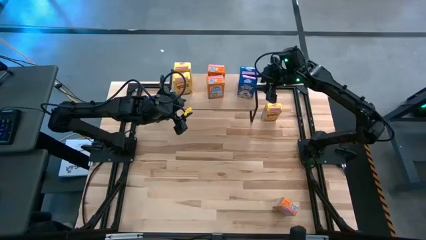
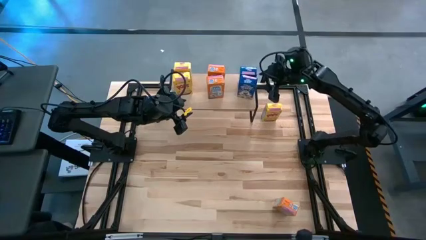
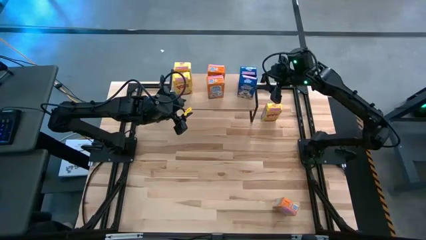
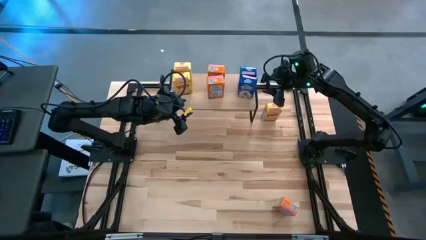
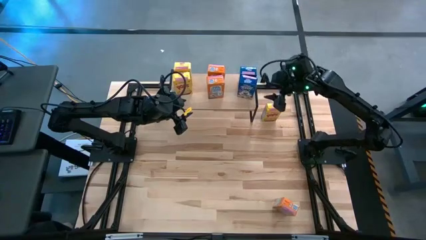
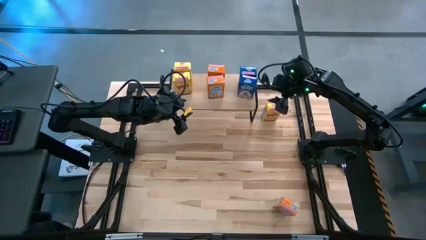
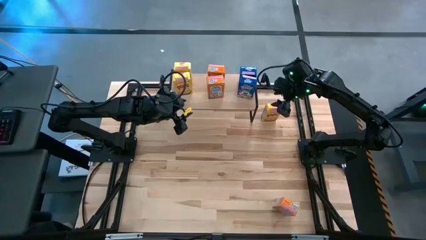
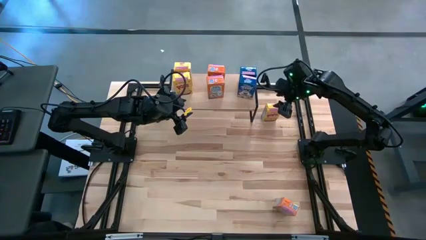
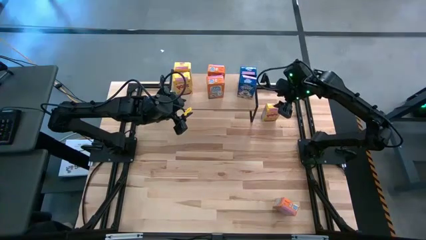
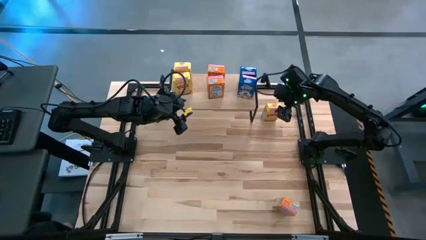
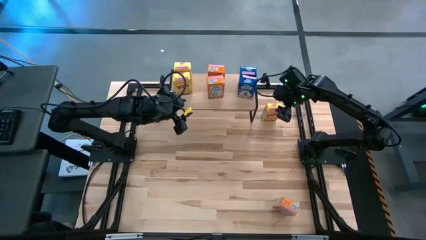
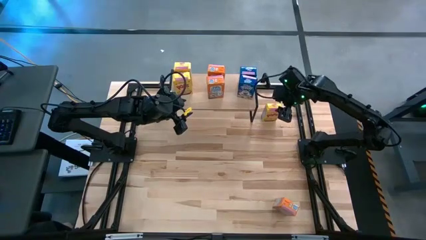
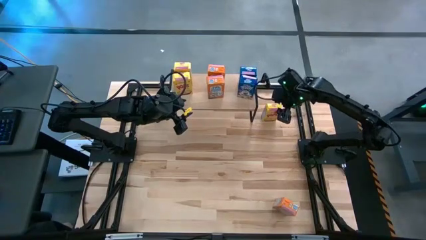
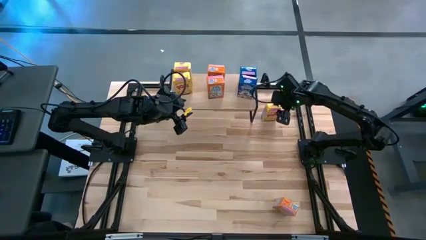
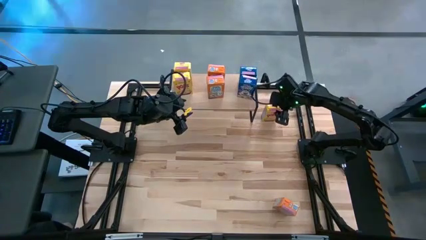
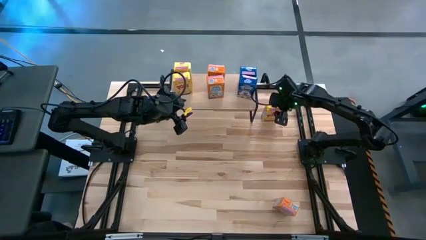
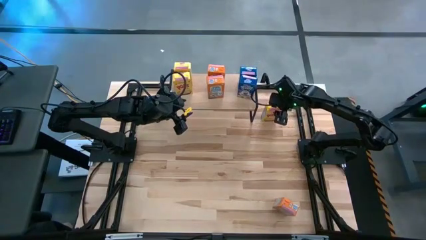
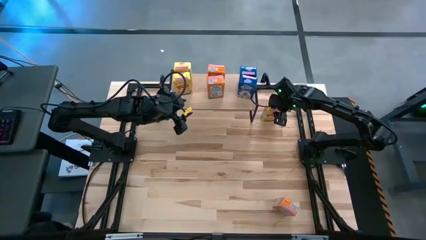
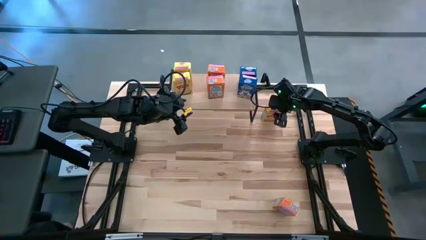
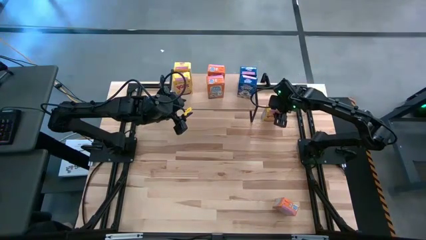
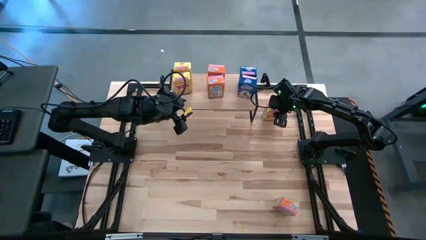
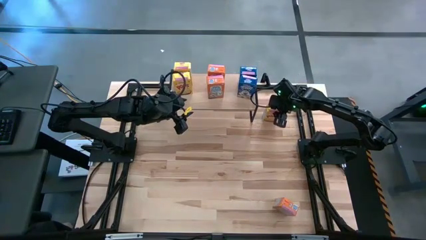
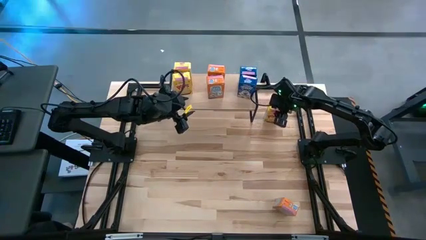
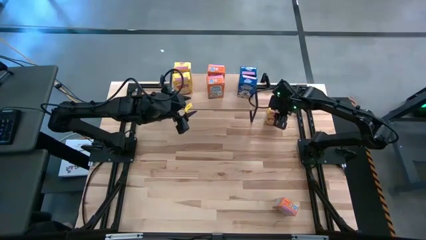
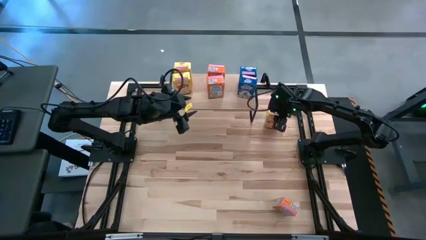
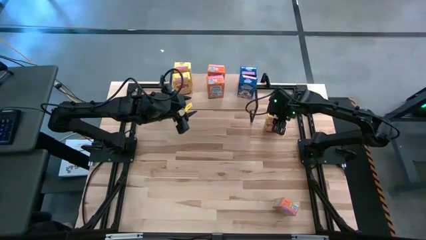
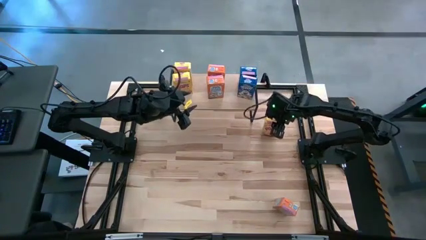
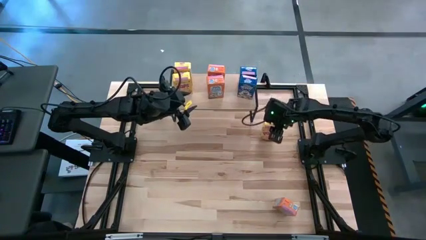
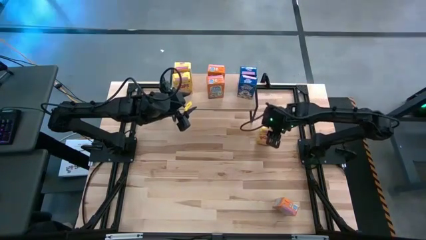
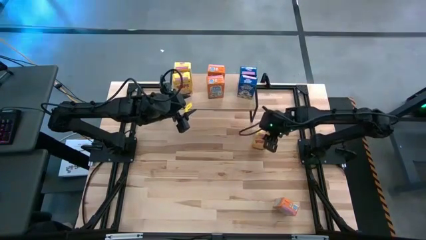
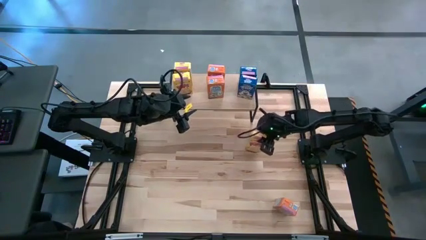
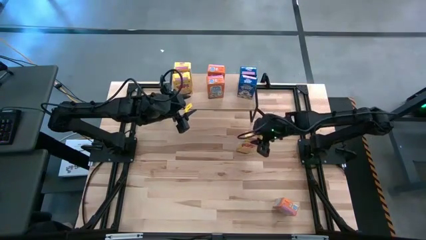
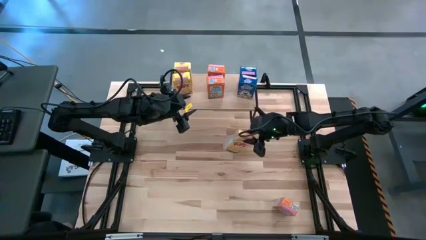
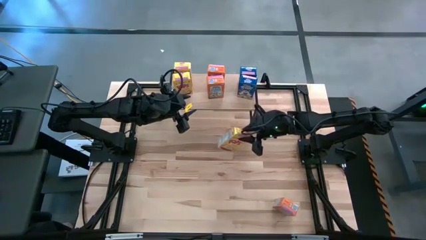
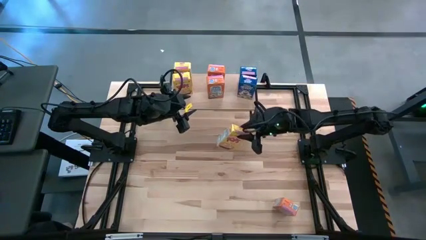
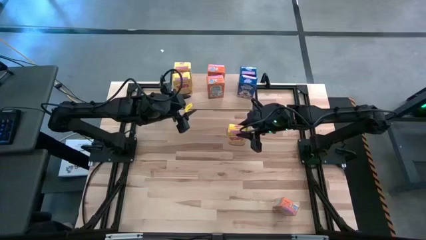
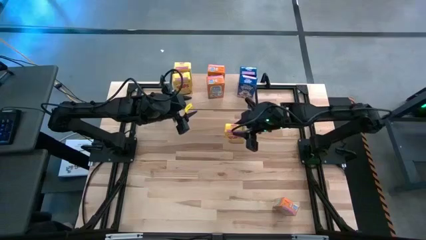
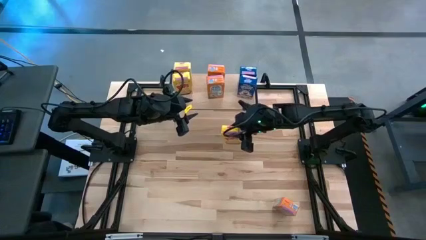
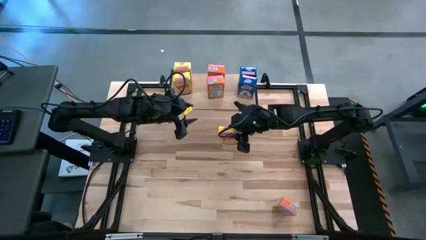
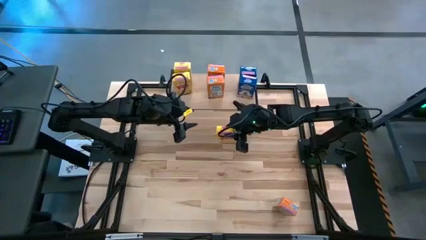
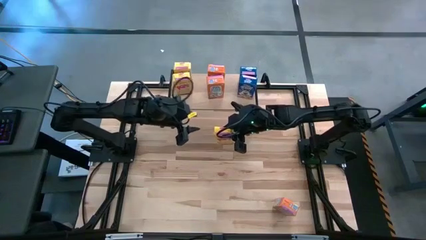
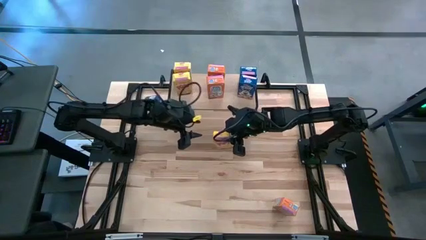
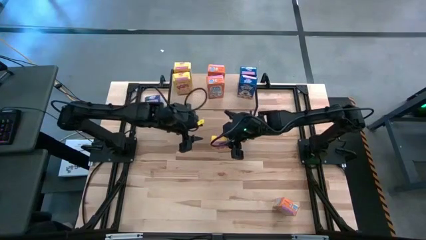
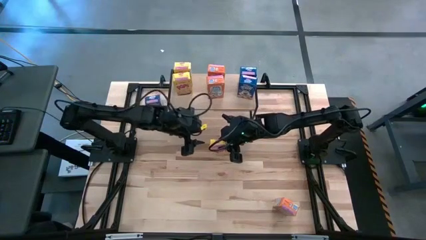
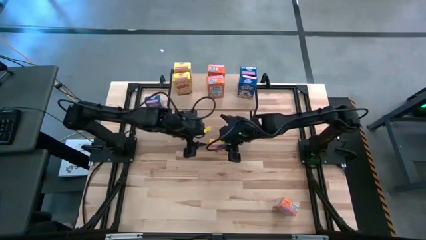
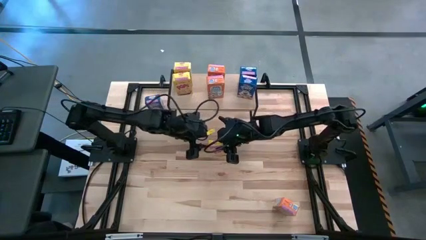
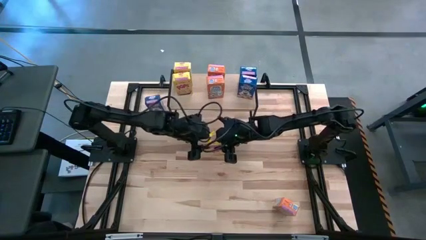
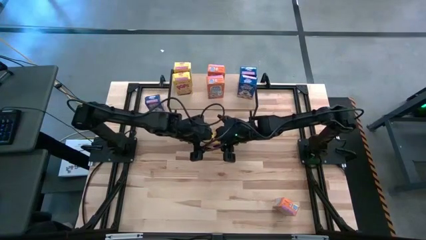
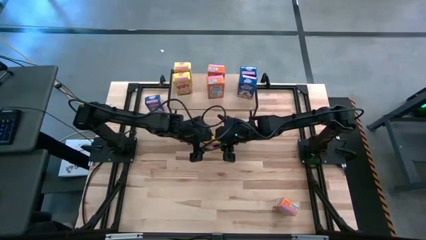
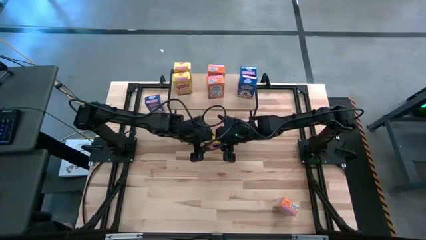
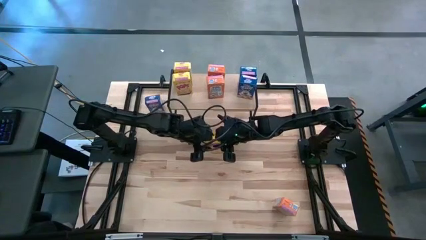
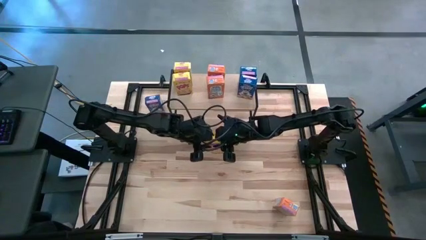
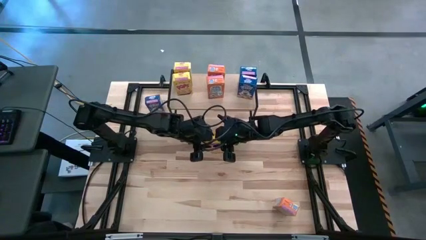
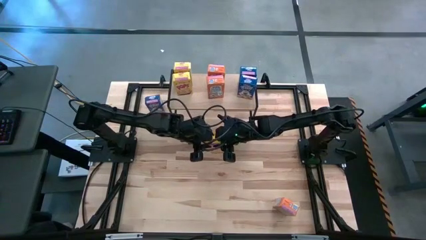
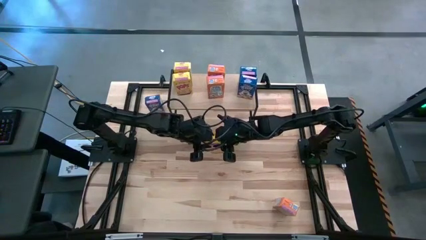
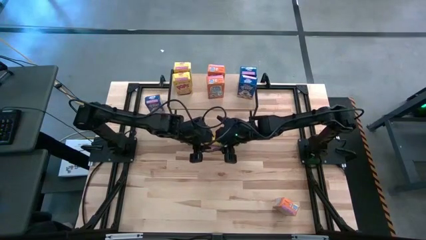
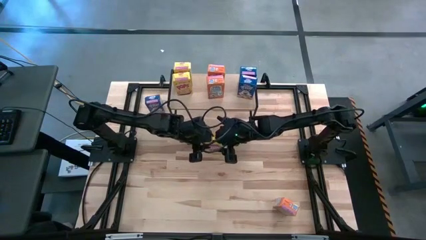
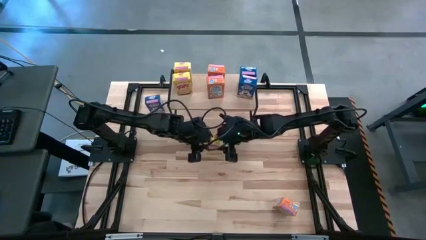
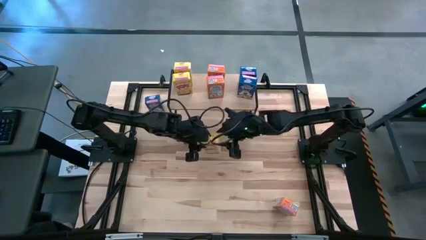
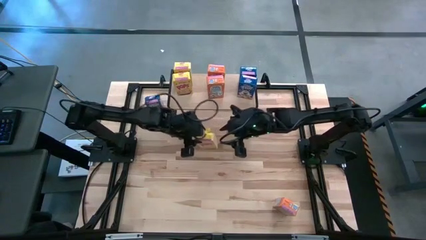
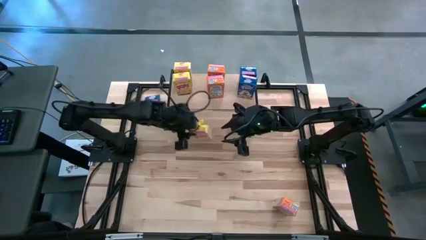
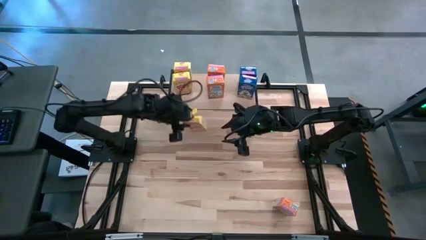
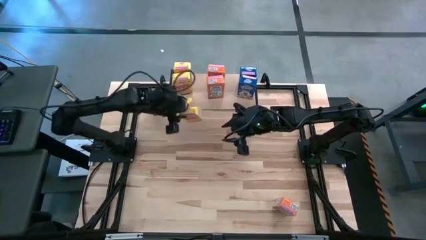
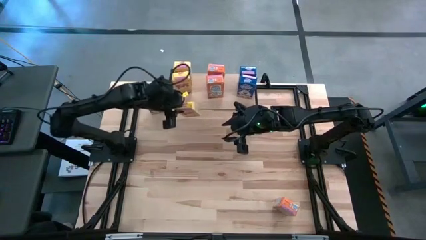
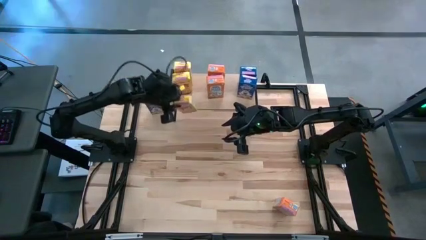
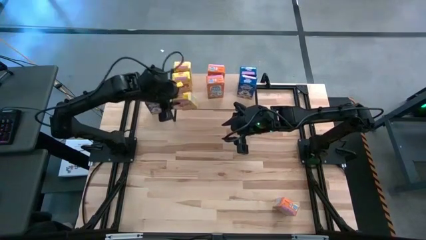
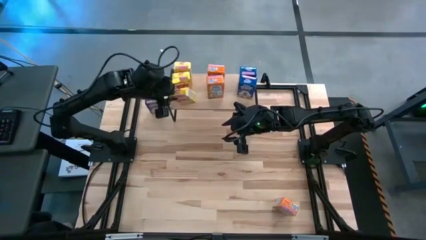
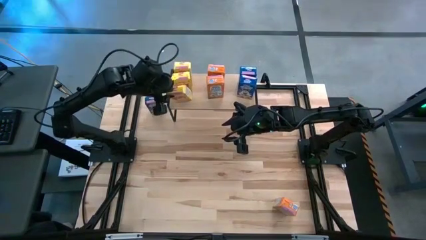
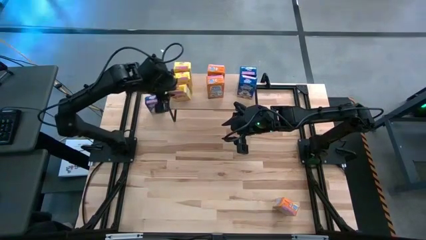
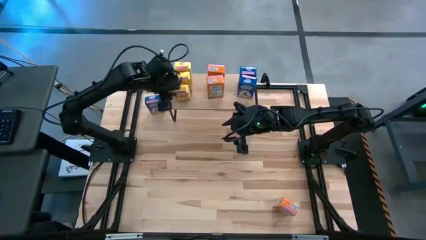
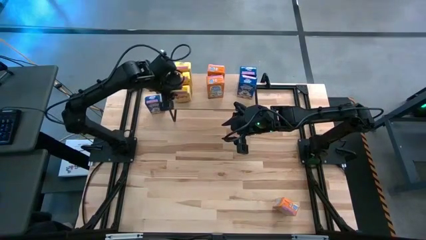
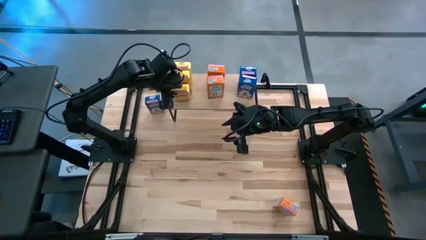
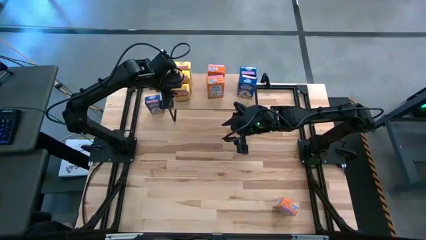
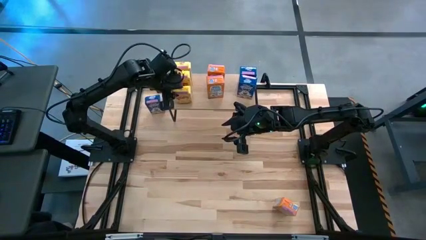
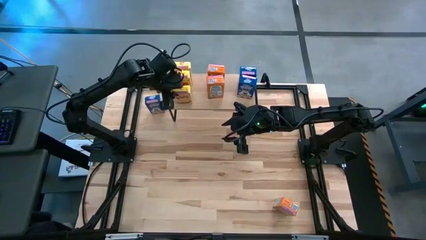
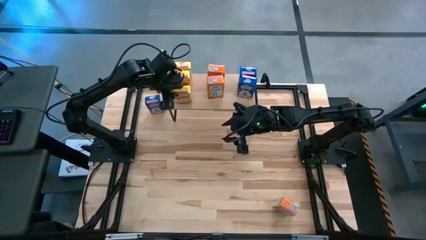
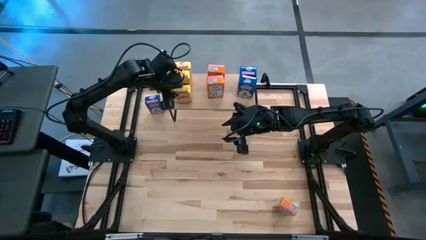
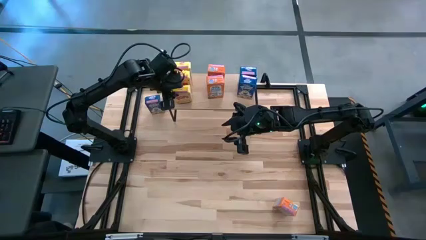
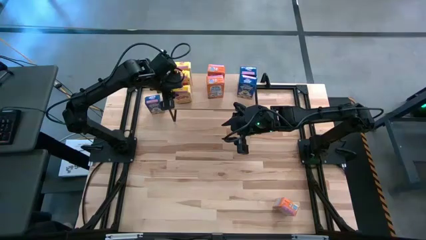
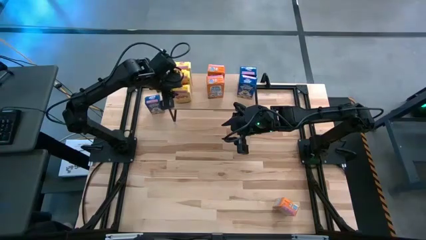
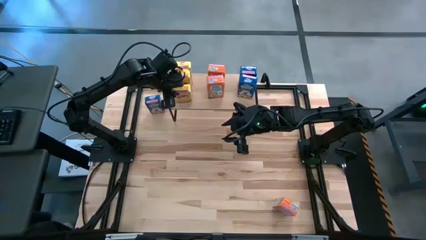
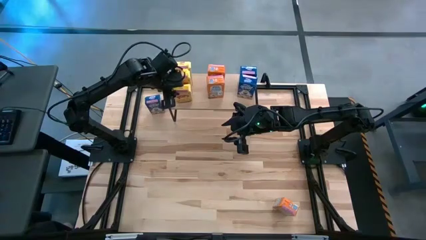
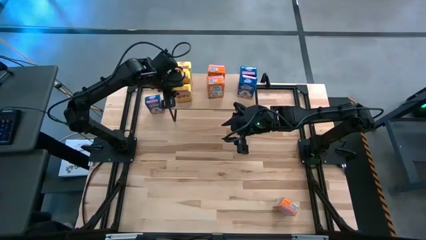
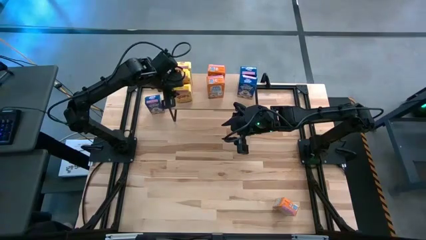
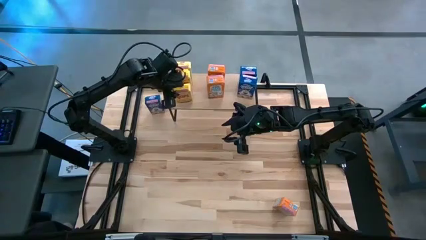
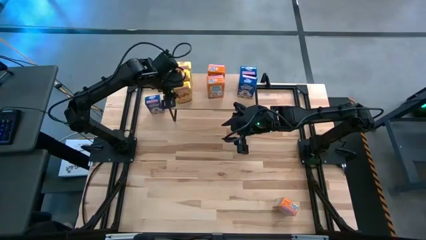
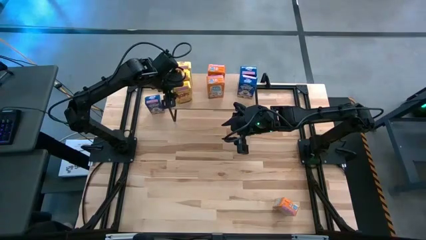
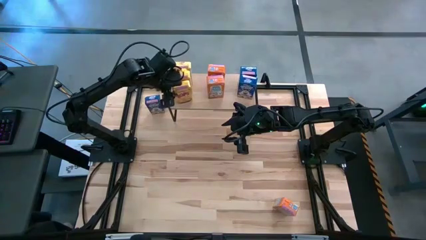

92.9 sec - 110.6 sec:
Task: Stack cereal on shelf
Put the yellow cereal box on the shelf aligned with the other yellow cereal boxes
